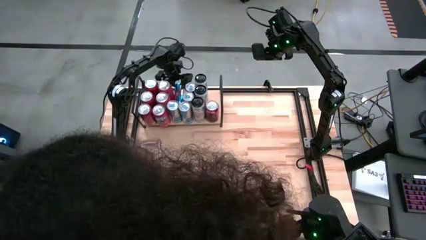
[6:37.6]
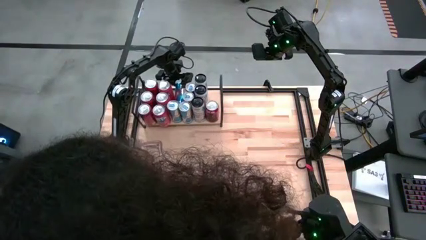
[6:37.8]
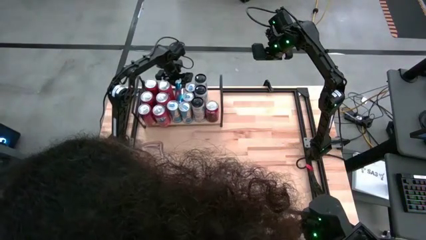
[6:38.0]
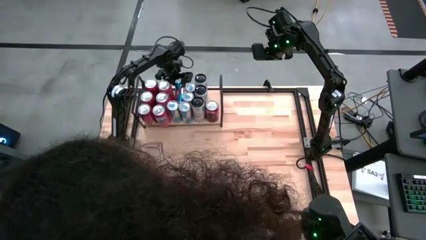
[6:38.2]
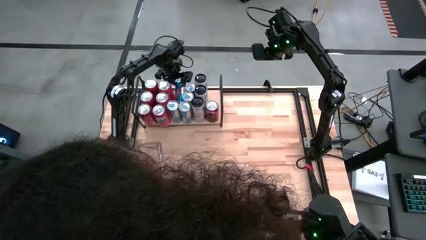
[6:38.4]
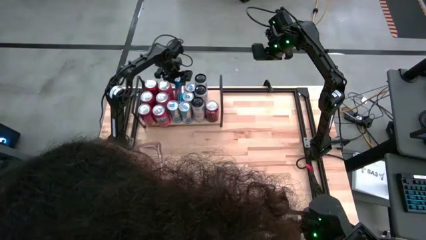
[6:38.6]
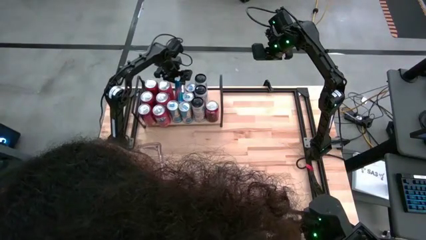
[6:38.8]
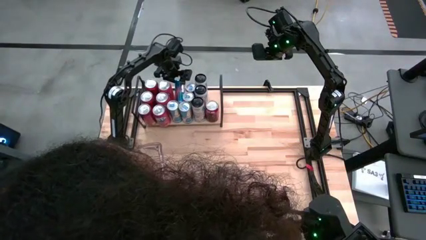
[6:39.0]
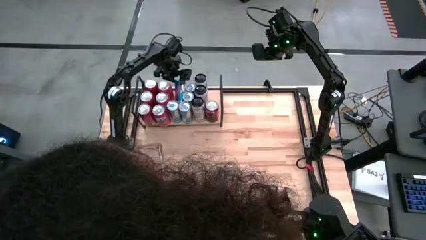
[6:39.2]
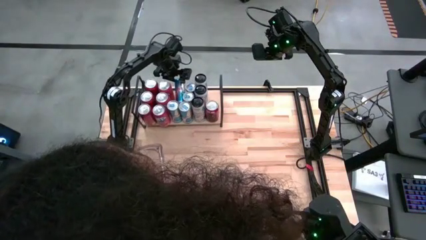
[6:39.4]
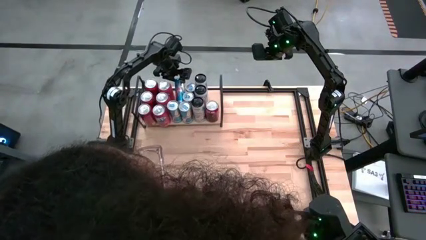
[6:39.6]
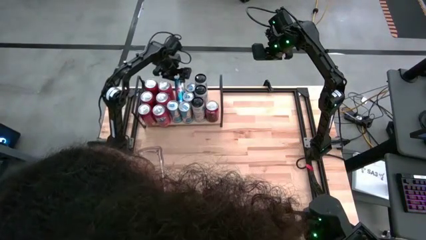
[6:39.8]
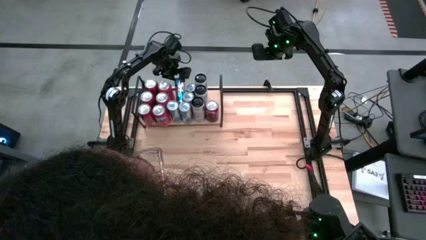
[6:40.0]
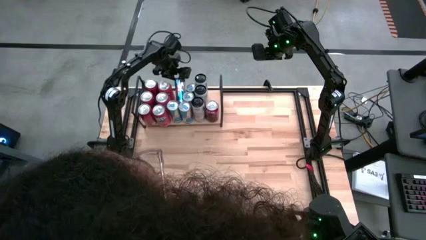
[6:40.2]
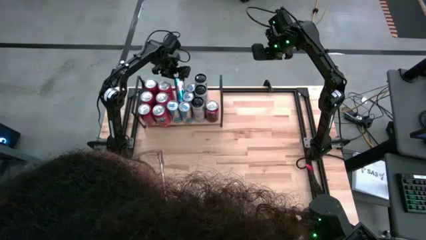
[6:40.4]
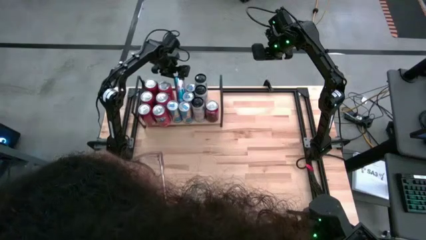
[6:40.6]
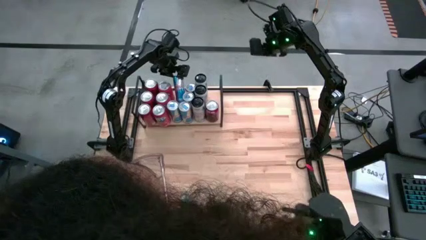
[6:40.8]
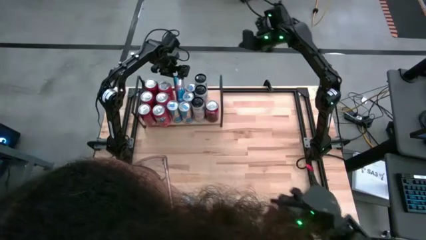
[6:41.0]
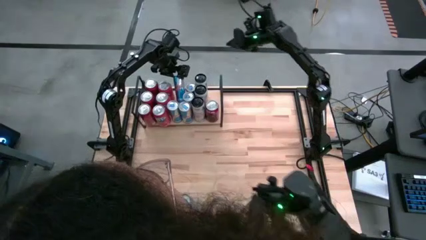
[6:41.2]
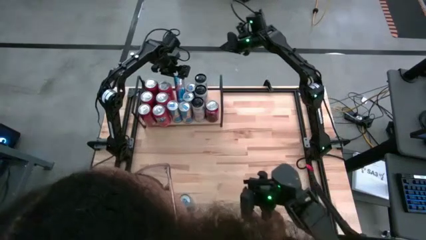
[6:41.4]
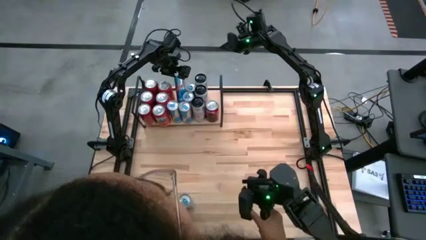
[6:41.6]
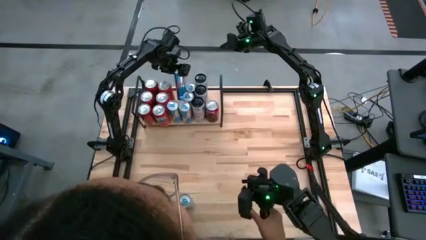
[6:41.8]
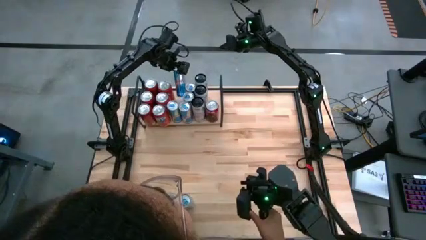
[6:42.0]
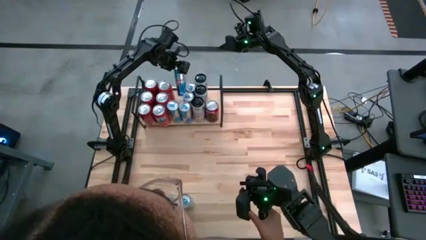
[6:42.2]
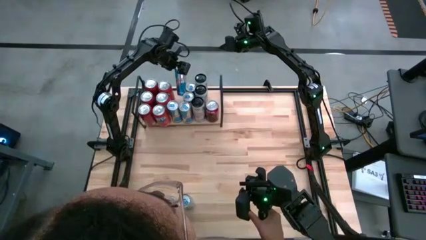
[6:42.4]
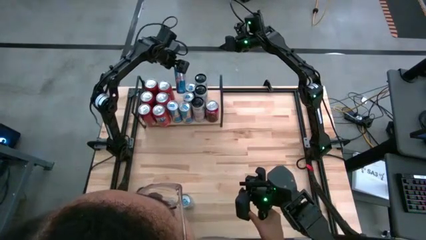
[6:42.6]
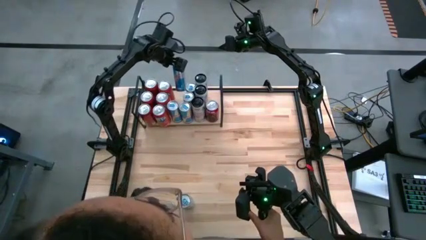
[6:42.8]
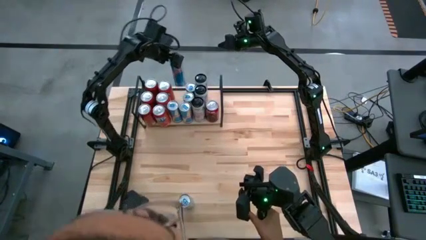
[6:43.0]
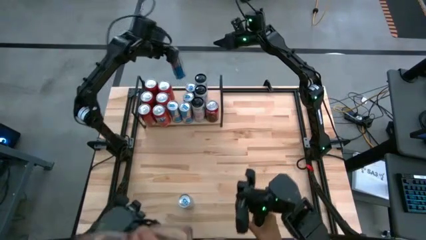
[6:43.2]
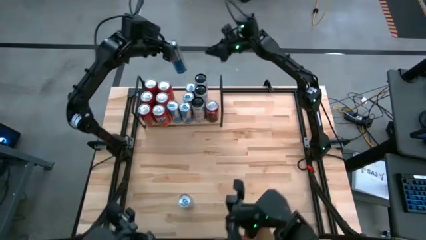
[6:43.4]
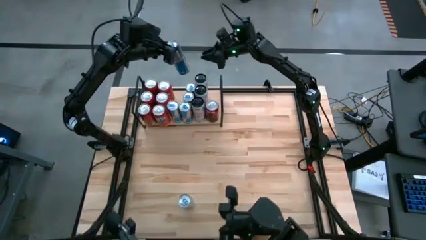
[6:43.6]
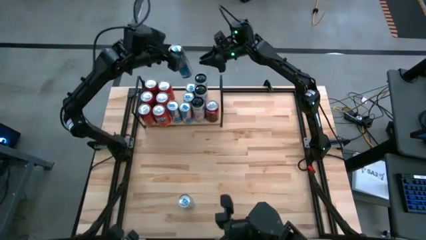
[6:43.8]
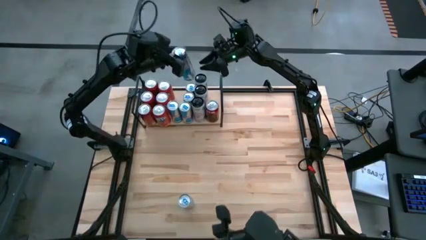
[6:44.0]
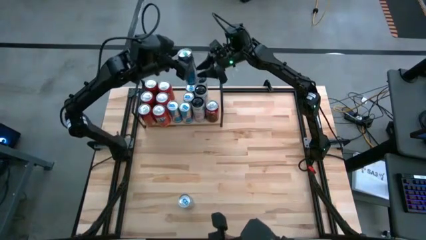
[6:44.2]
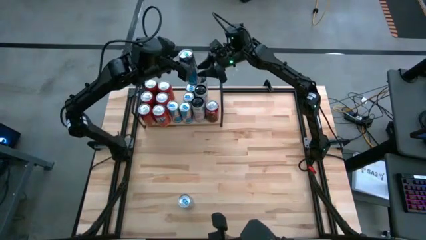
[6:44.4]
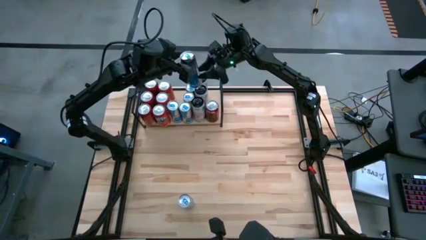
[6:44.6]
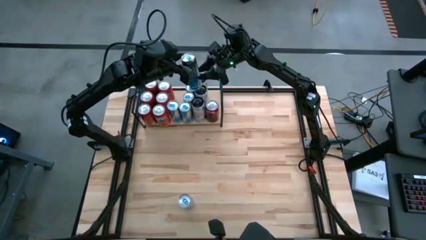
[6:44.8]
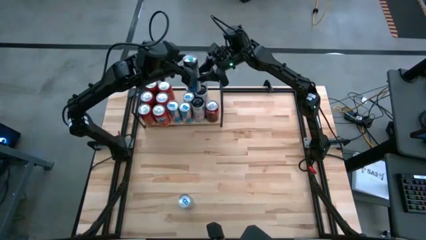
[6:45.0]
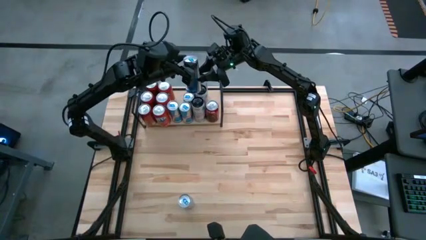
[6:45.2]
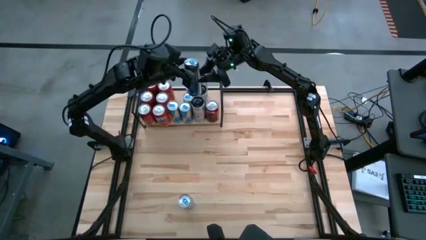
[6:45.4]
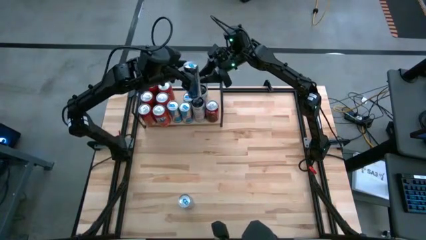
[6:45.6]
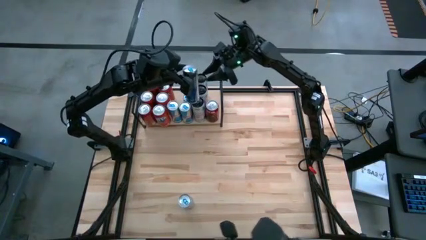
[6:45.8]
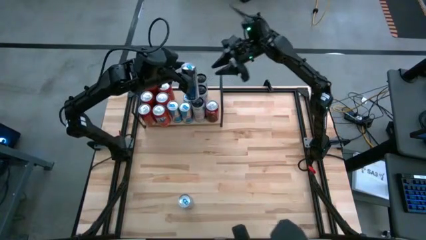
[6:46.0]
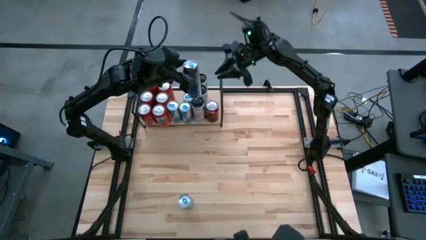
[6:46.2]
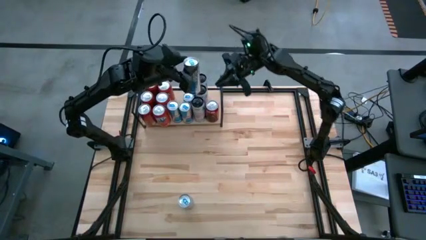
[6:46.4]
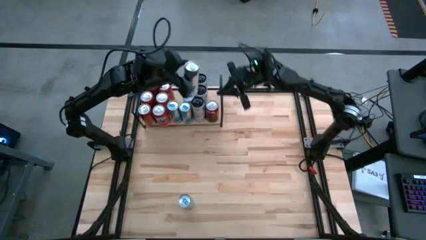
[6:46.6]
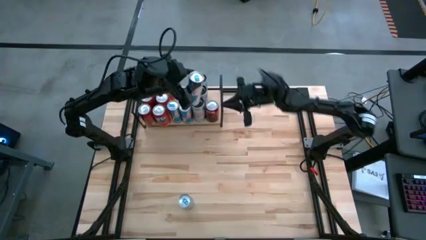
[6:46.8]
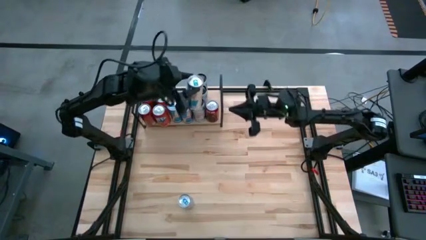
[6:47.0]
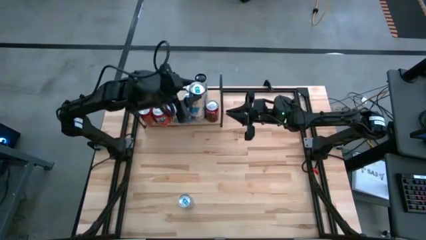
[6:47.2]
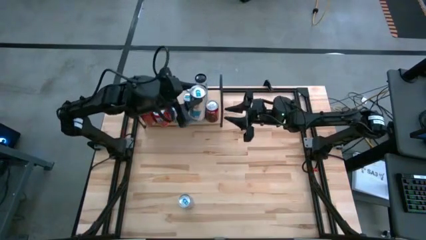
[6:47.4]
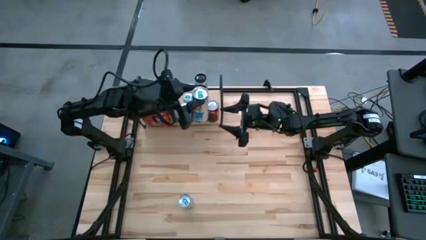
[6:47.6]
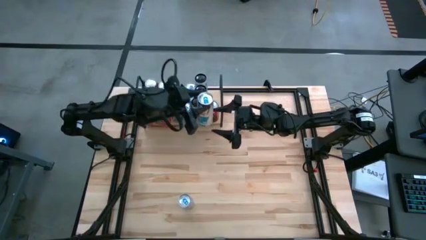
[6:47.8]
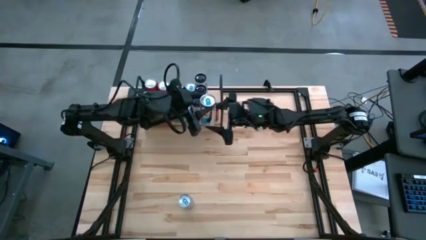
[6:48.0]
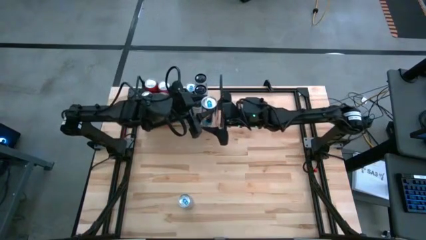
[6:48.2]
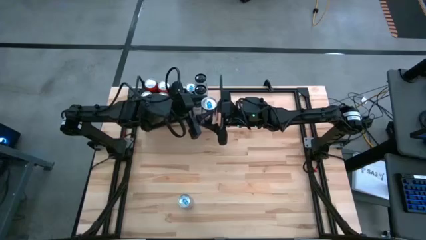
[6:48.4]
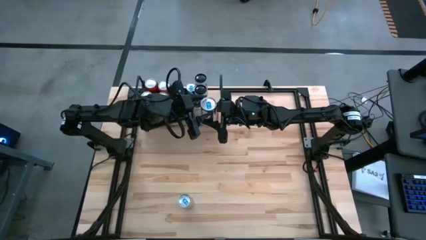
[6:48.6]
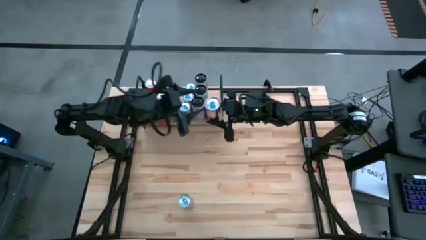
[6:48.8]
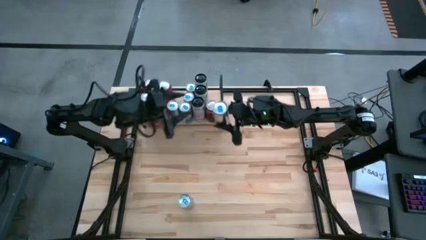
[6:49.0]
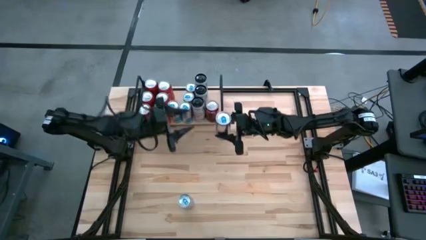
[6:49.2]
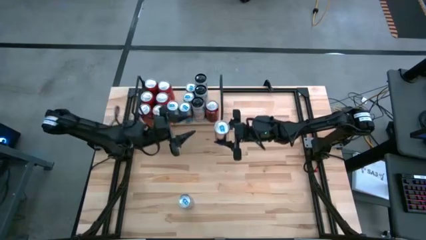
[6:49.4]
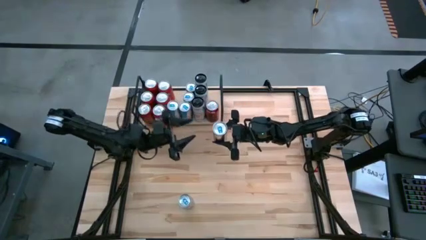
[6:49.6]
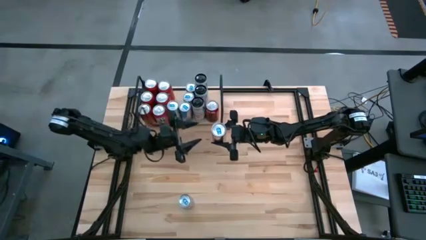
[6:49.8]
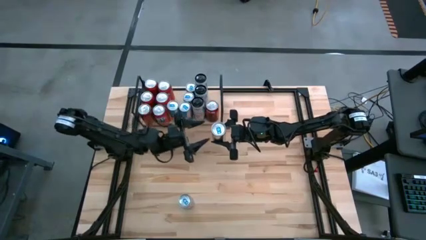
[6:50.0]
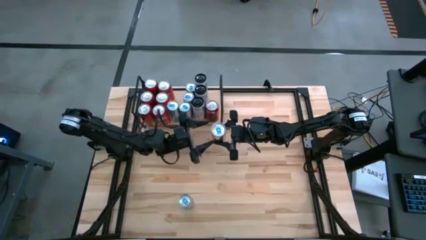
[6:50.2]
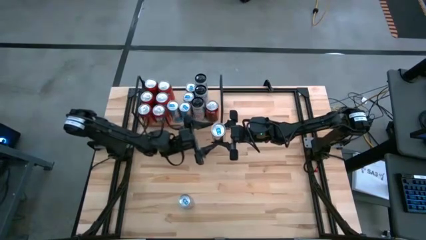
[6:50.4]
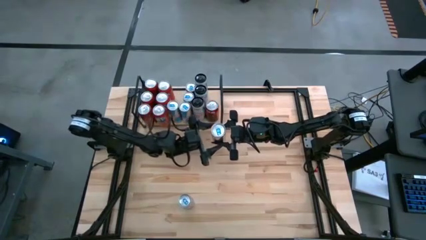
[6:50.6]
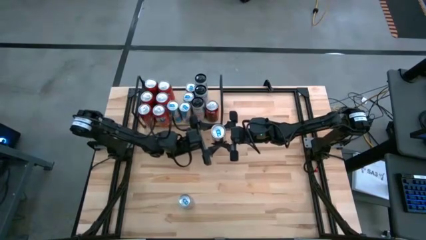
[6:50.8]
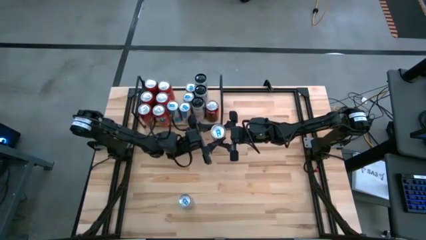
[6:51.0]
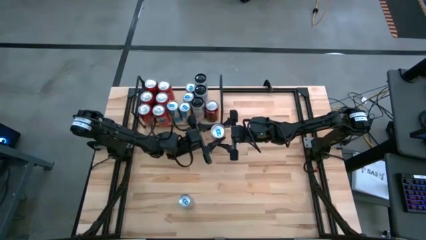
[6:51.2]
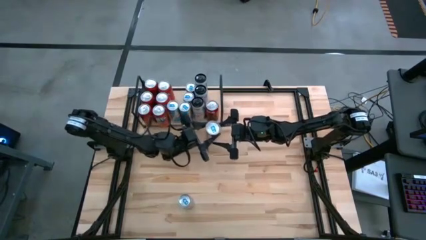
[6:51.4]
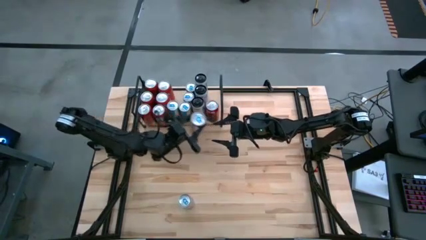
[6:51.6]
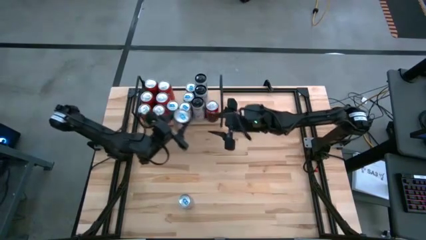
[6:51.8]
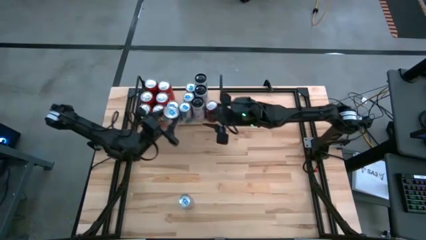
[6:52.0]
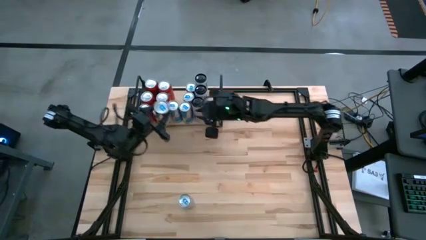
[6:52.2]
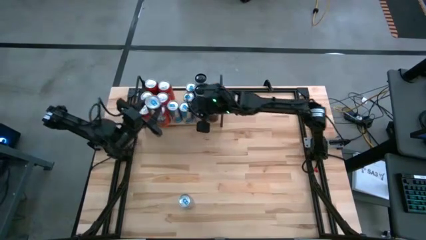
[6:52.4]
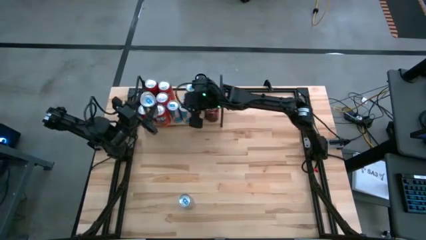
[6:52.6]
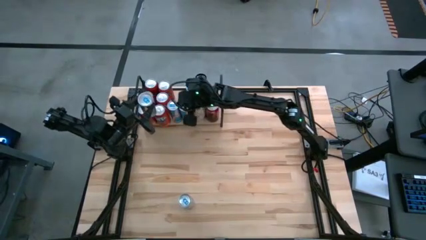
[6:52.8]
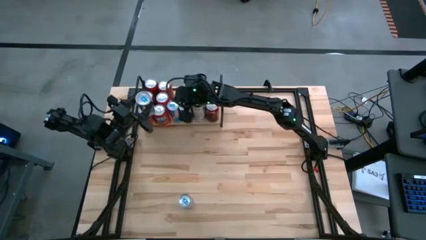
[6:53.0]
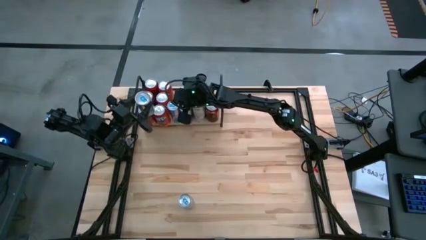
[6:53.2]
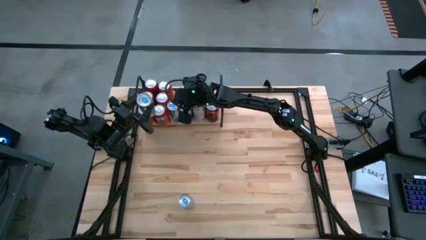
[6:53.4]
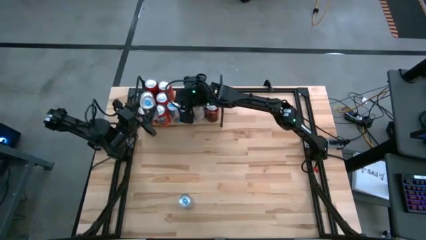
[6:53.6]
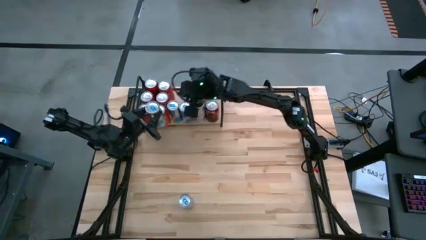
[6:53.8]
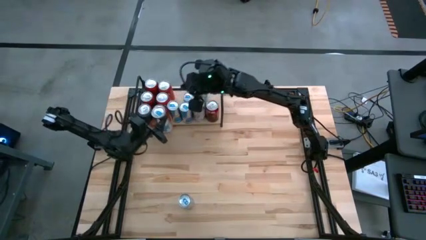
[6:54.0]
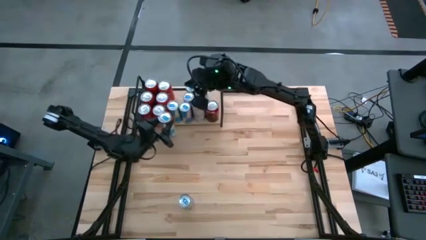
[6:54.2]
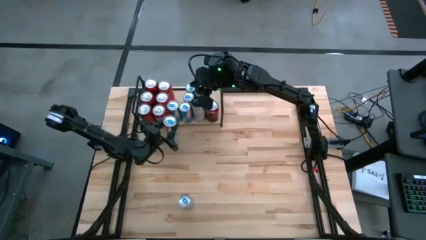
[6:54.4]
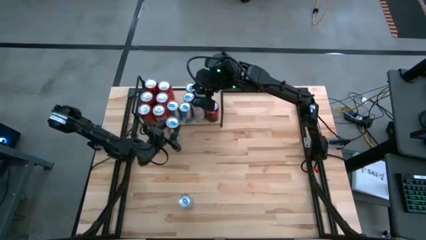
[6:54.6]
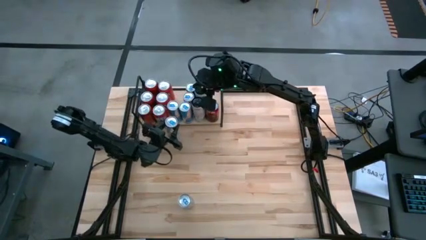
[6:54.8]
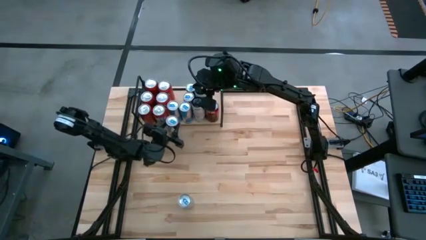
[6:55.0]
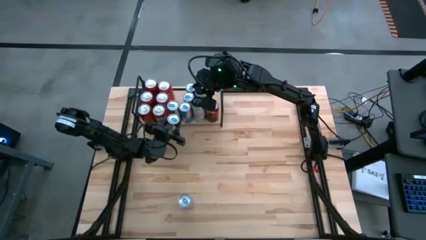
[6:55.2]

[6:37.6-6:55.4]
Task: Place canned beverage on shelf
Put the blue soda can on the shelf aligned with the other blue soda can
